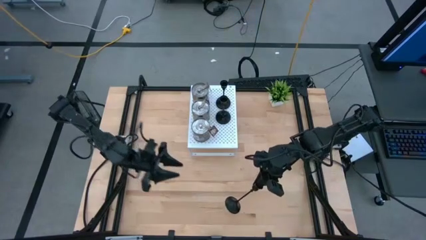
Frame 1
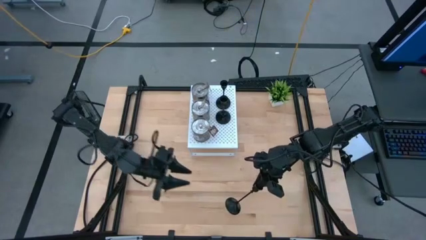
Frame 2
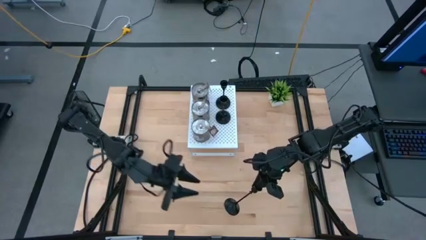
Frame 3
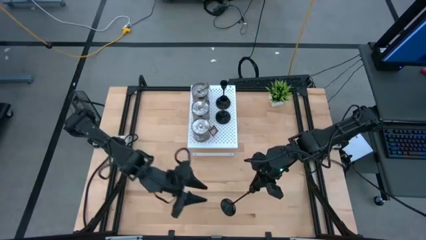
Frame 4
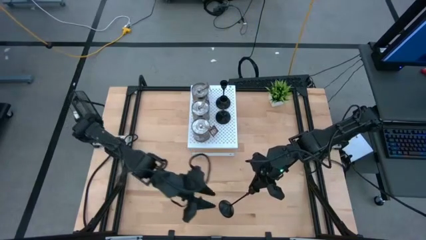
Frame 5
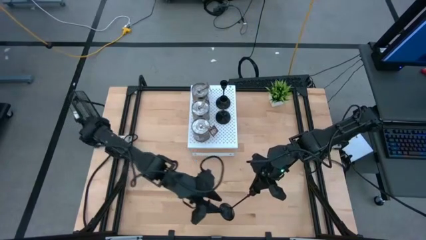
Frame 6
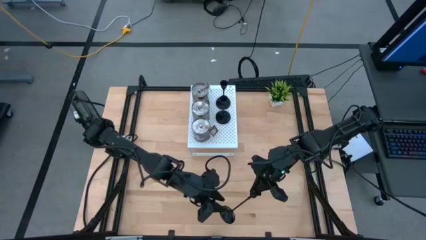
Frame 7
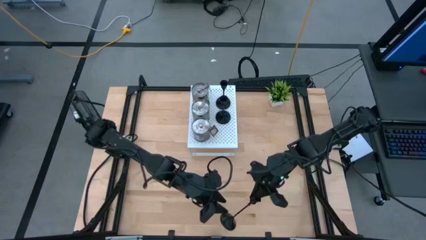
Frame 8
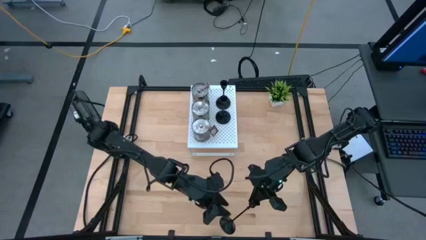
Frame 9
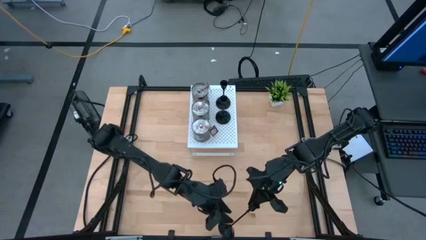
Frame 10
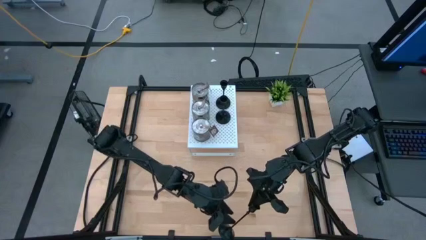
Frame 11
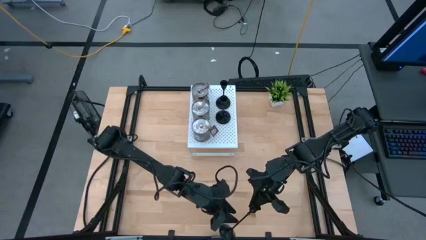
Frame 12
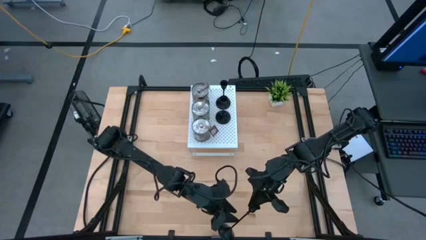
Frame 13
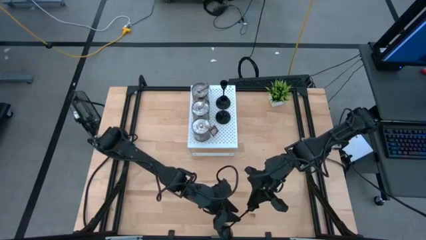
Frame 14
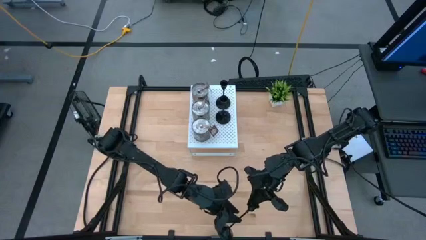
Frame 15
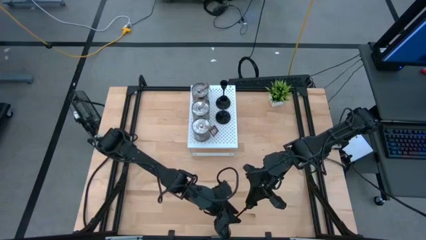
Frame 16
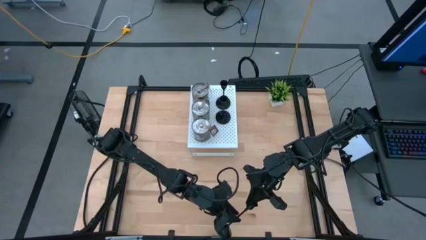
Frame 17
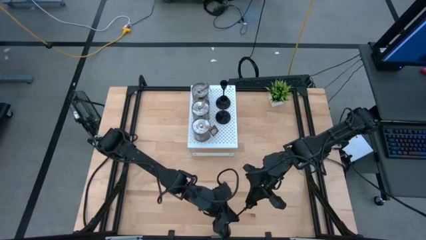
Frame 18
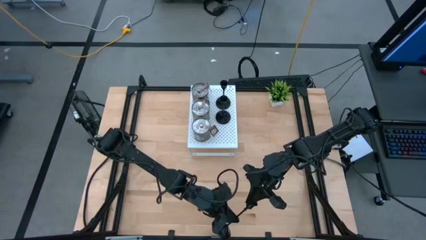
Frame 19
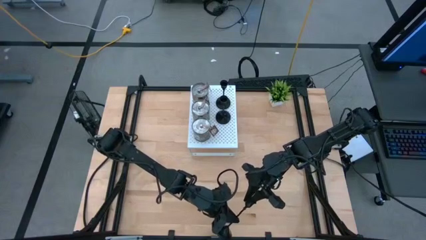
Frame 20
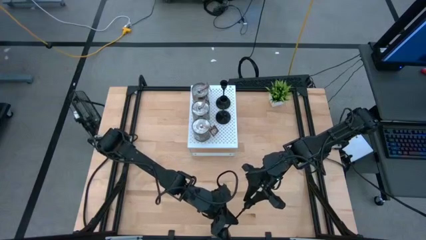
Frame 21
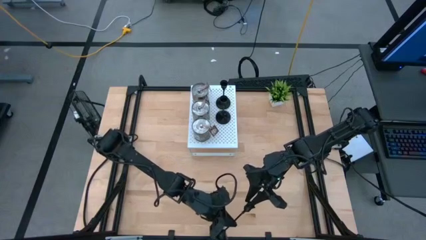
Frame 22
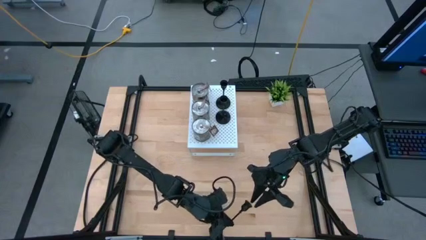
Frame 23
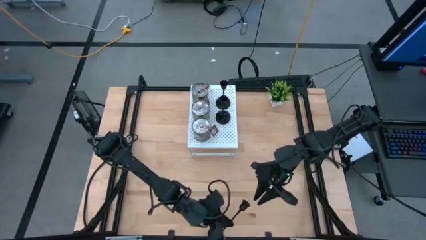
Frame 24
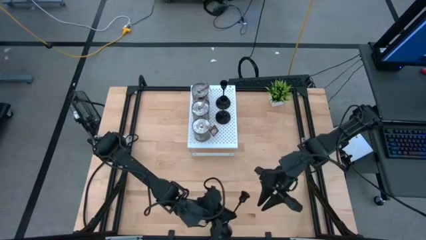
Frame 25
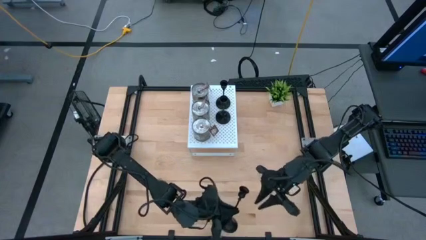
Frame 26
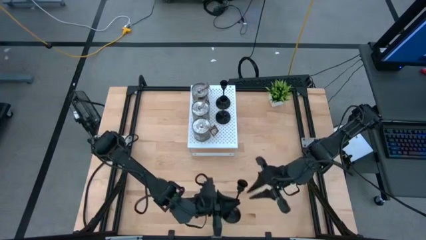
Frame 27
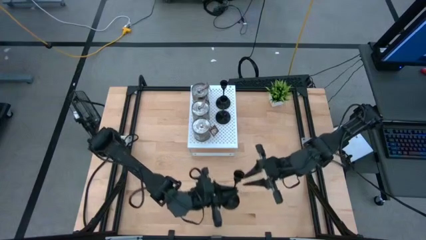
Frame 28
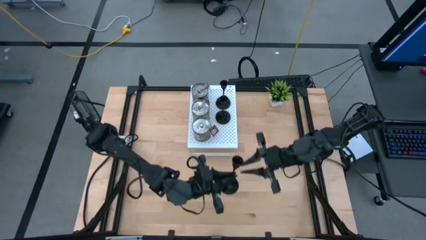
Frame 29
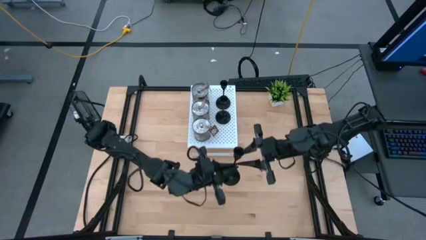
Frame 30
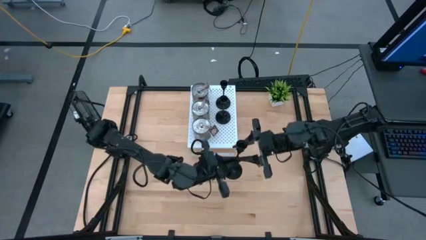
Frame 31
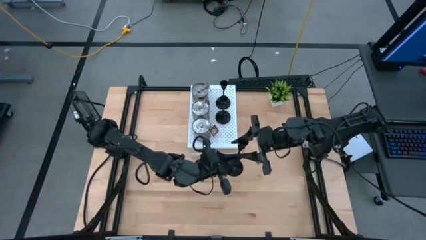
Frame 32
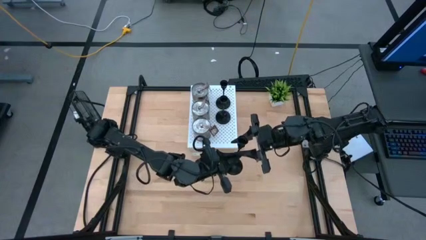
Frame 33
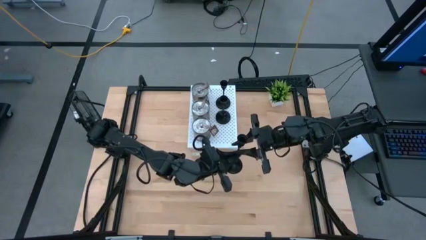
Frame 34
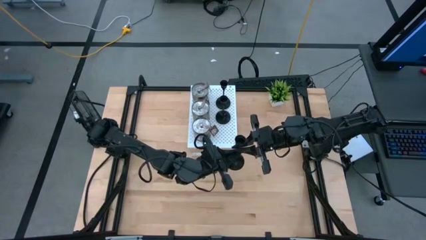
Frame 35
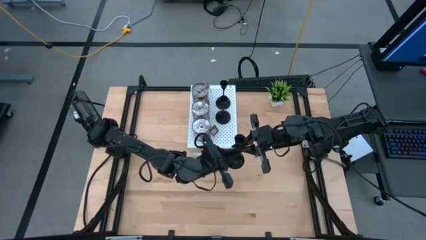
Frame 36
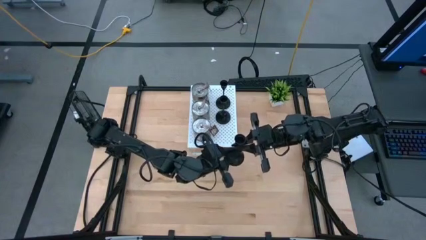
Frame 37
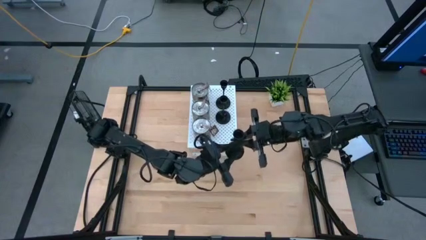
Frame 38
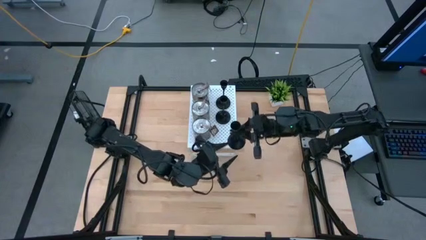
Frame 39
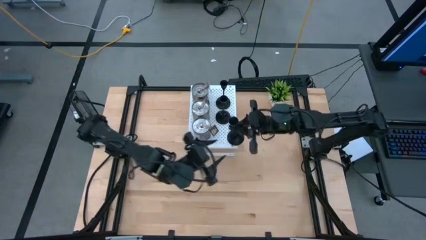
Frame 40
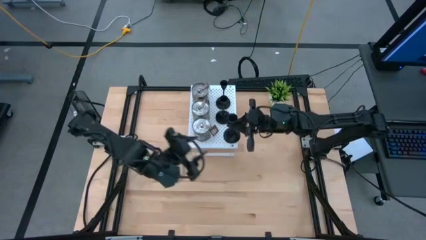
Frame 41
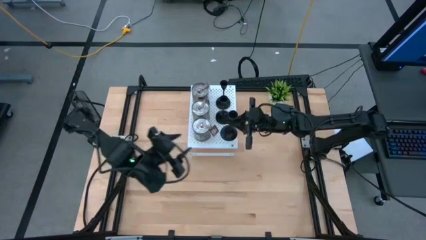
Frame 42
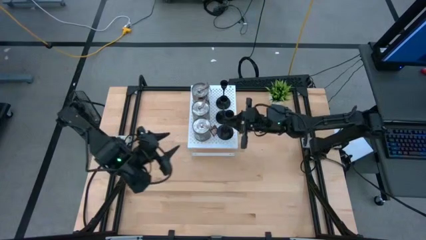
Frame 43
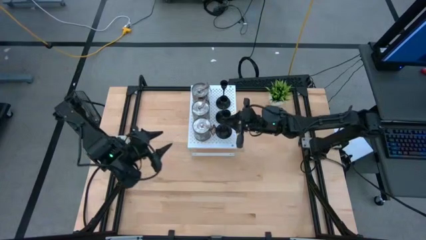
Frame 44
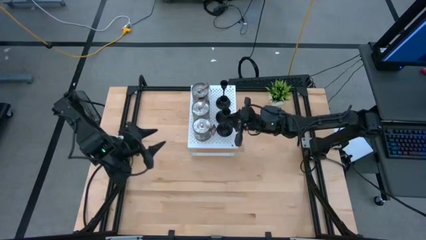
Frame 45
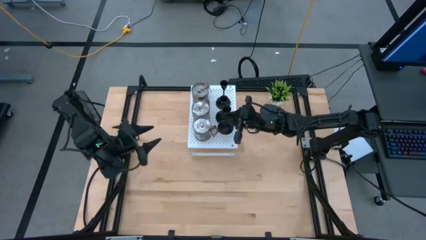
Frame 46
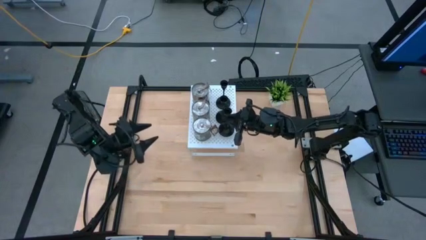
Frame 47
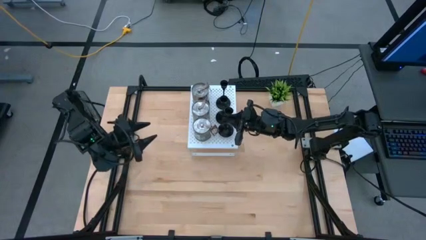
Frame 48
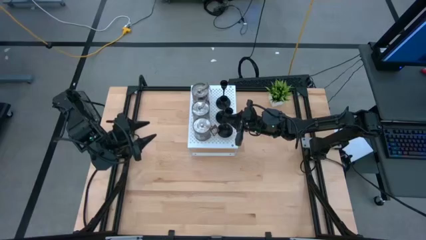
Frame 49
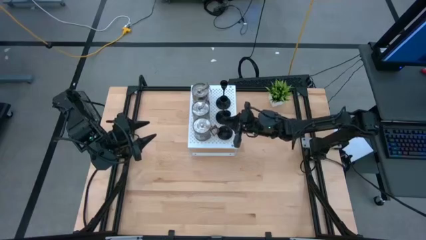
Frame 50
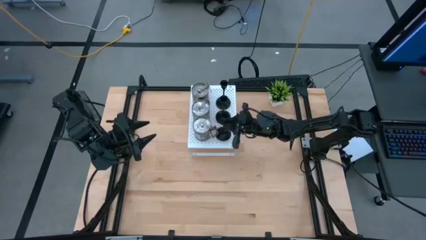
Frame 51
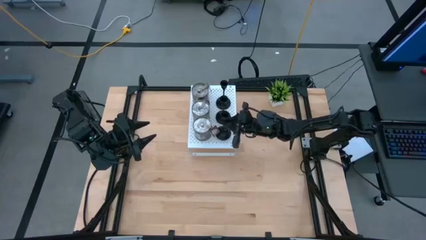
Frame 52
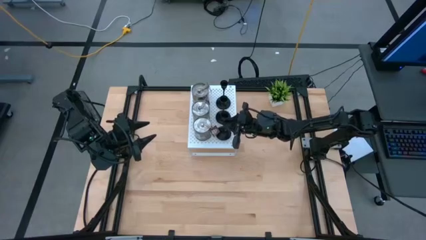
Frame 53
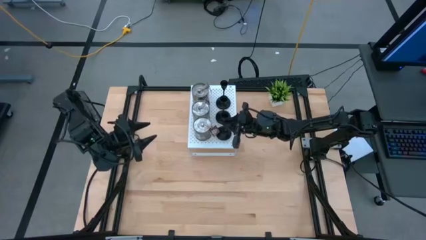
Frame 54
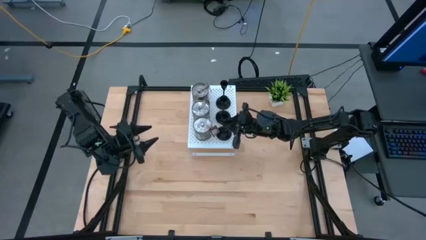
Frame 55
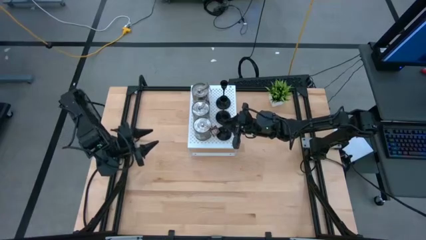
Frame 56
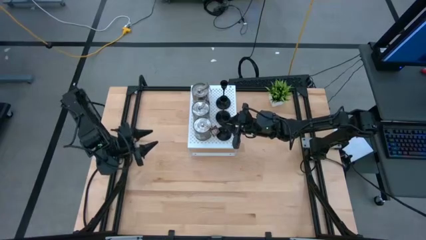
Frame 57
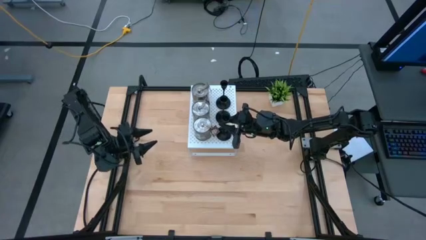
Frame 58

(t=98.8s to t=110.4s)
Task: Pick & Place candle stick holders
Put the black candle holder on the shelf aligned with the other black candle holders

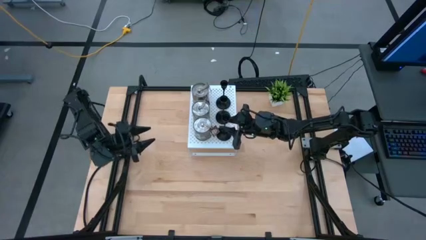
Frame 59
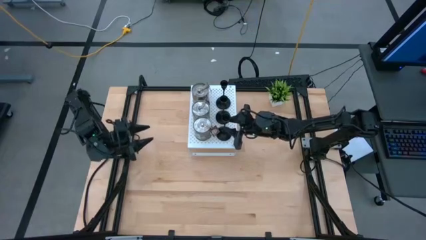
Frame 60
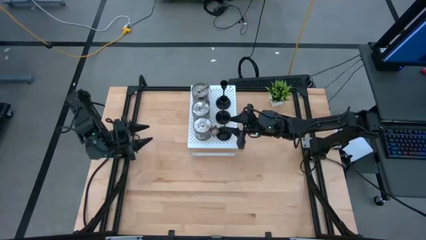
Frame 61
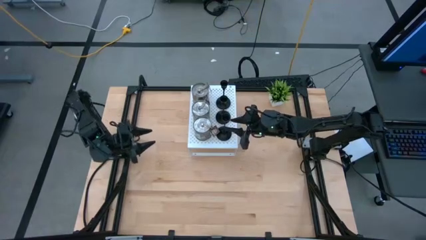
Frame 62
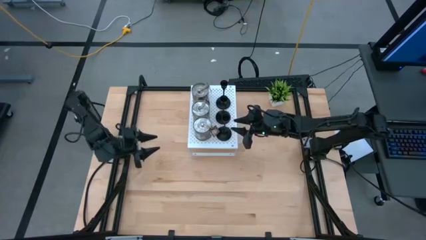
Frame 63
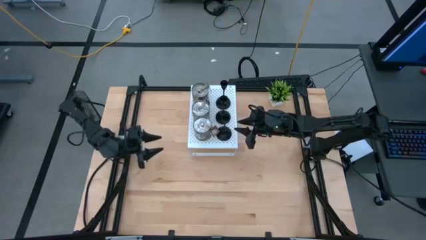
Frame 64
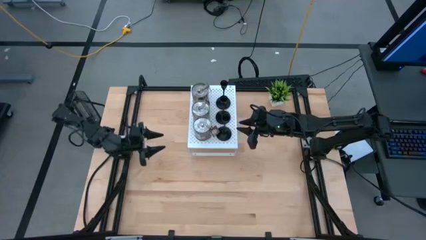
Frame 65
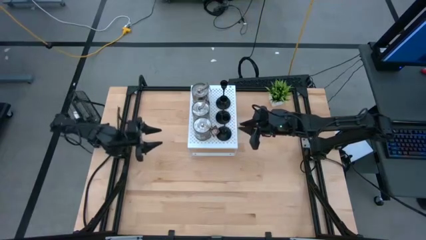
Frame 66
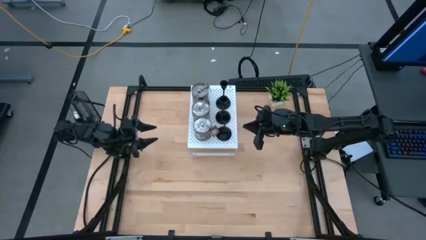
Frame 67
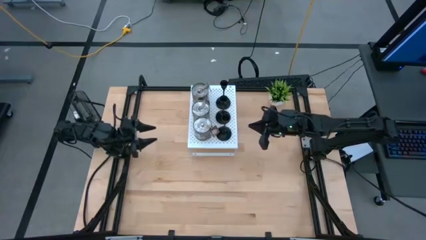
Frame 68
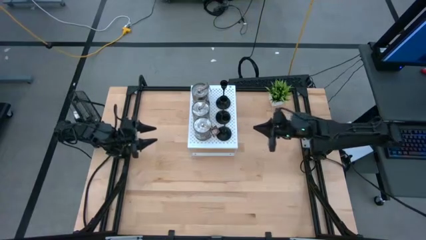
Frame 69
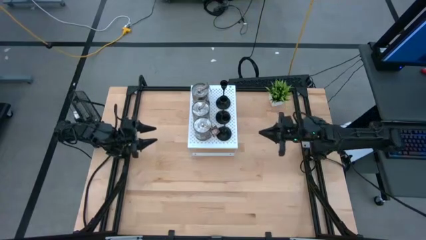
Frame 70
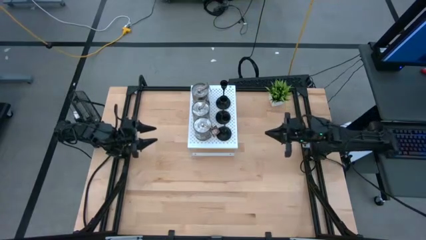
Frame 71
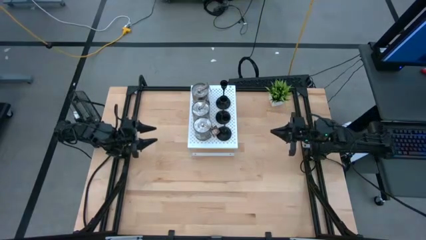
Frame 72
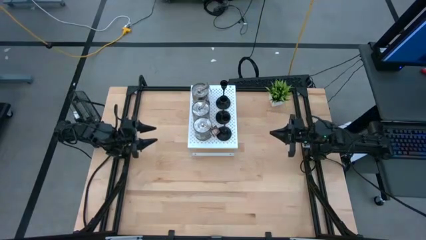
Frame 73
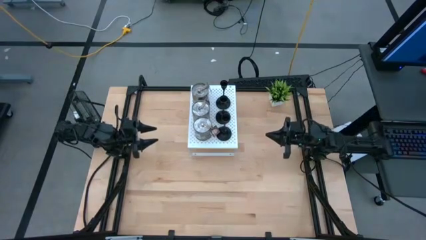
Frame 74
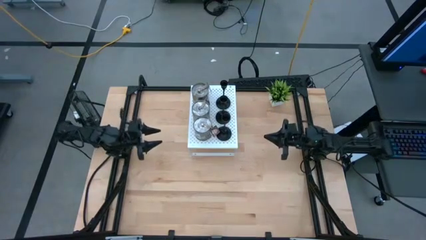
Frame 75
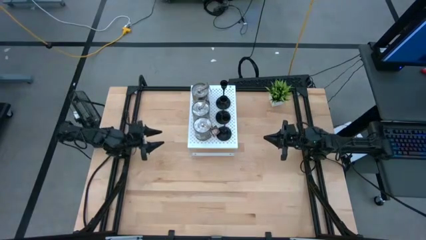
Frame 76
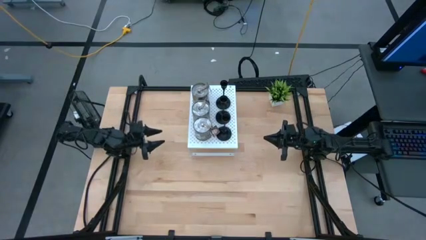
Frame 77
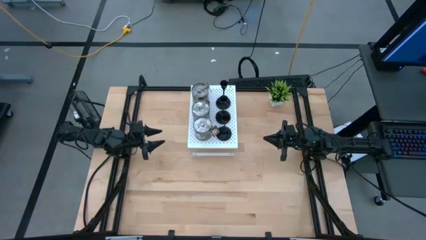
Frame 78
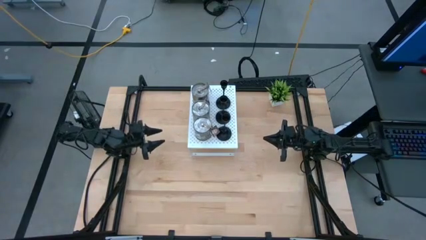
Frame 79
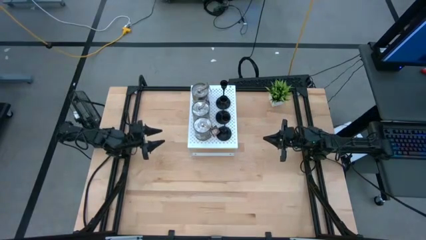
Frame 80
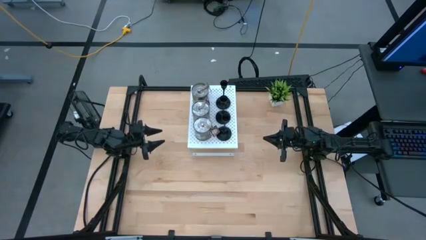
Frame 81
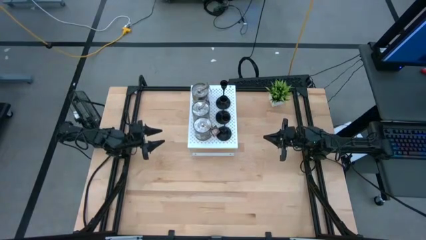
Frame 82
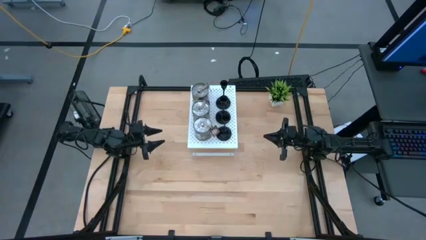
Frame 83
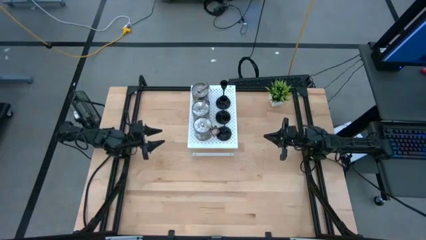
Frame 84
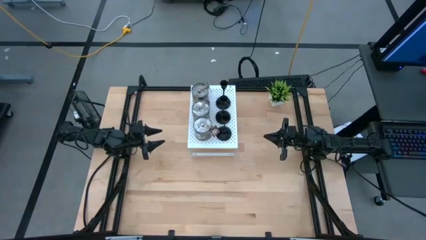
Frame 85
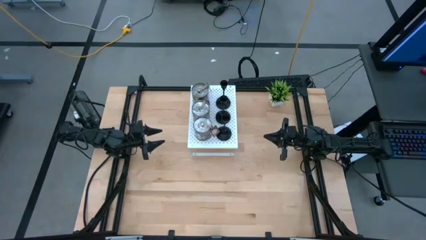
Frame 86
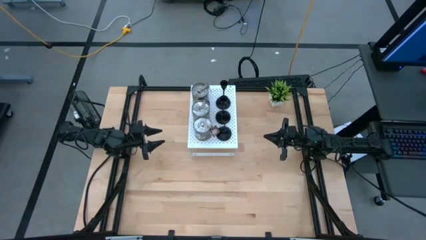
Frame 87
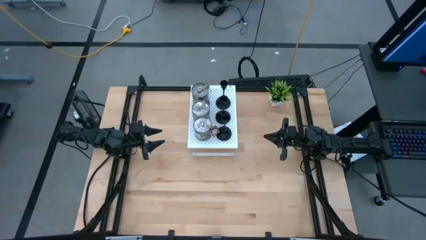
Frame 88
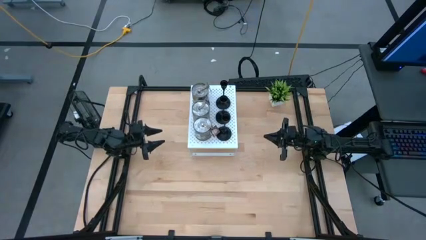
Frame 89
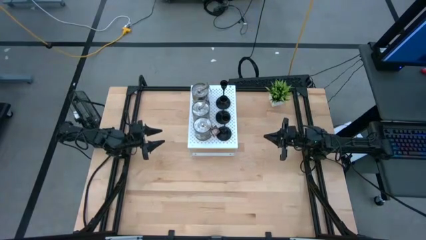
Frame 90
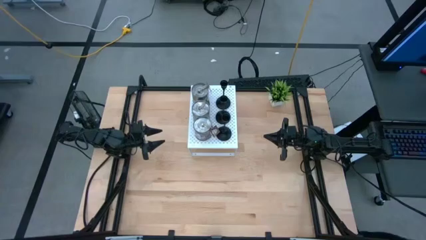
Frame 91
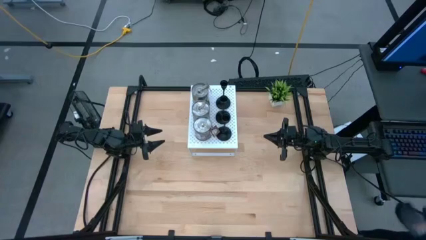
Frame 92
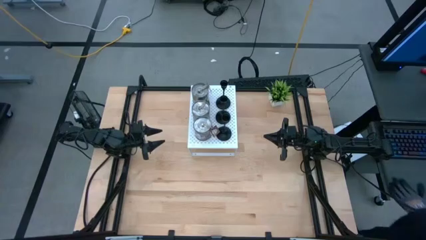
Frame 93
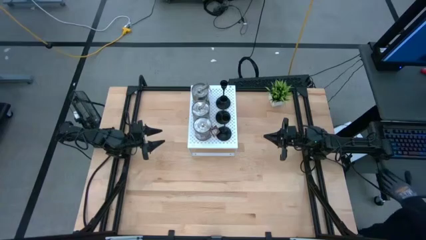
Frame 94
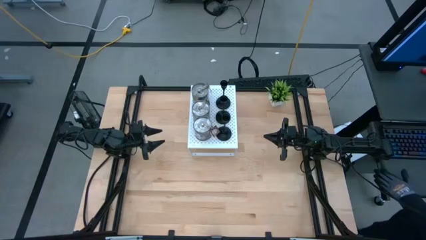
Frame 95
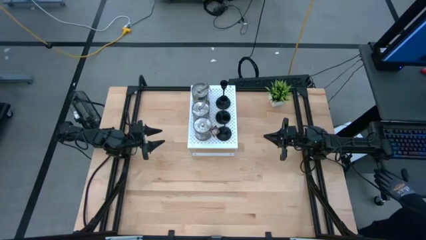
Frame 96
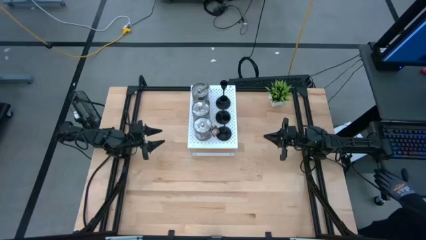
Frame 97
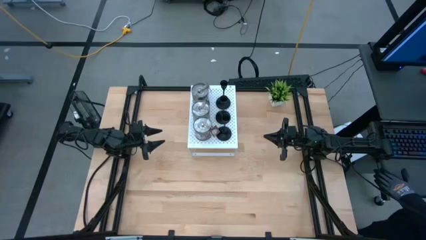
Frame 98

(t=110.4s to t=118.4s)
Return to Home Position
